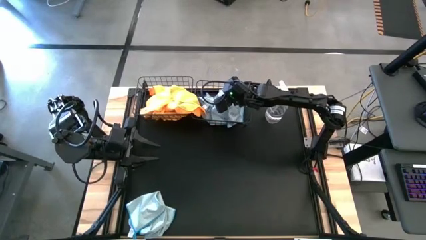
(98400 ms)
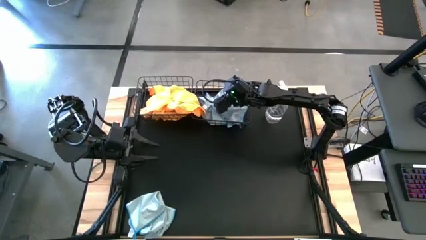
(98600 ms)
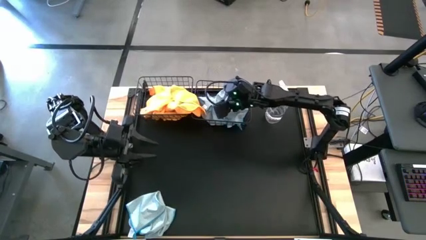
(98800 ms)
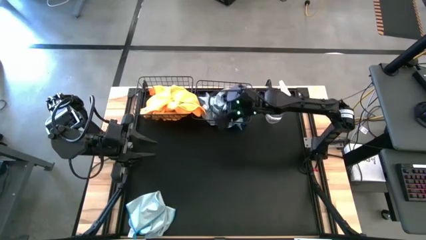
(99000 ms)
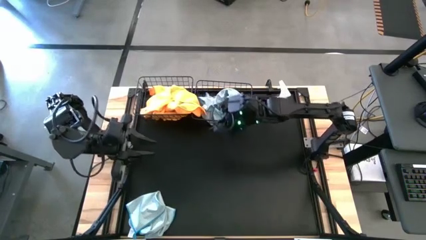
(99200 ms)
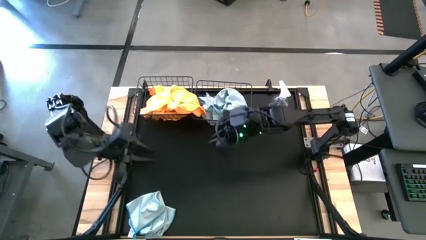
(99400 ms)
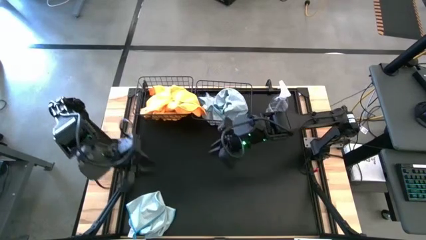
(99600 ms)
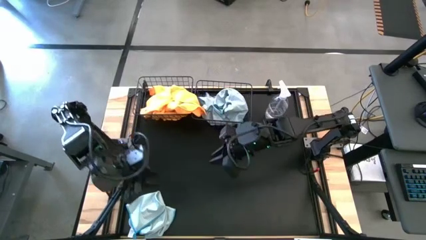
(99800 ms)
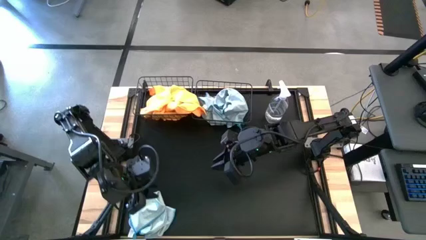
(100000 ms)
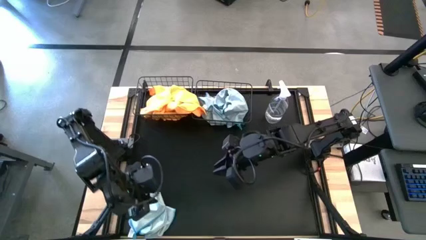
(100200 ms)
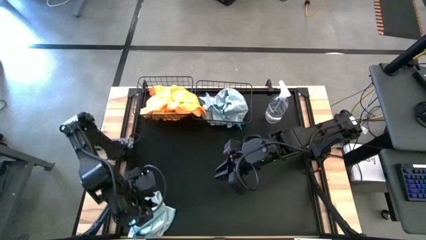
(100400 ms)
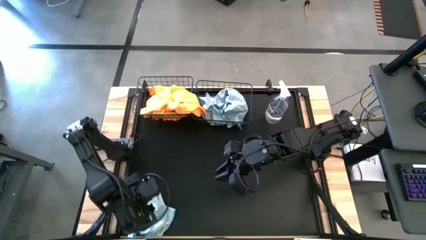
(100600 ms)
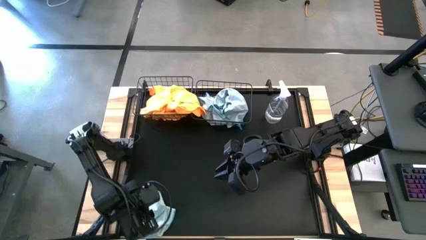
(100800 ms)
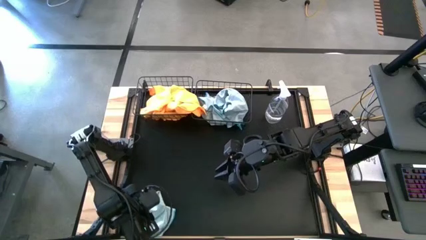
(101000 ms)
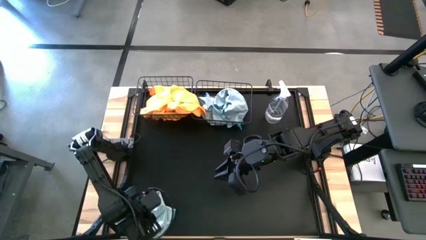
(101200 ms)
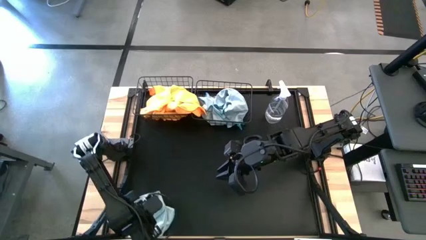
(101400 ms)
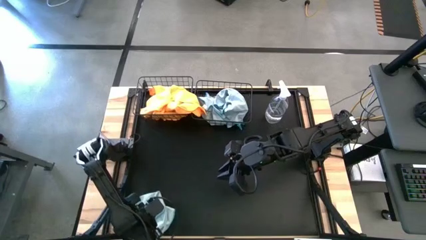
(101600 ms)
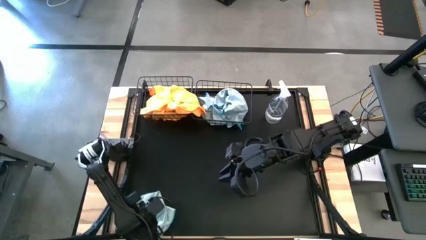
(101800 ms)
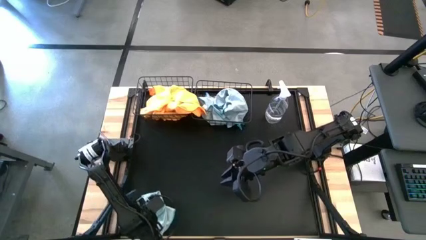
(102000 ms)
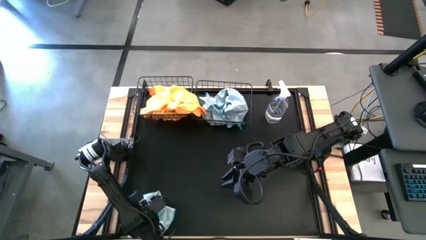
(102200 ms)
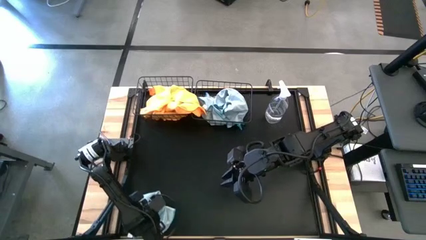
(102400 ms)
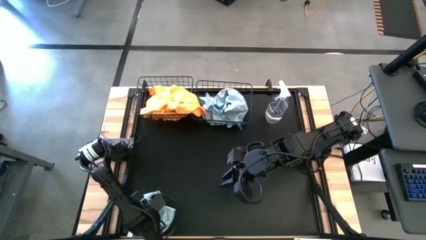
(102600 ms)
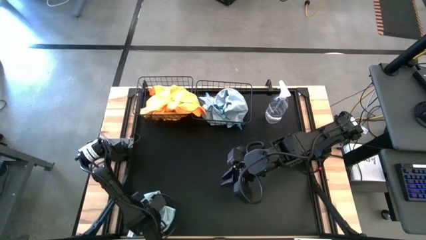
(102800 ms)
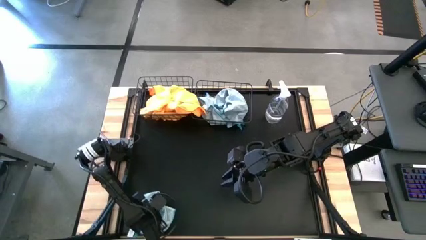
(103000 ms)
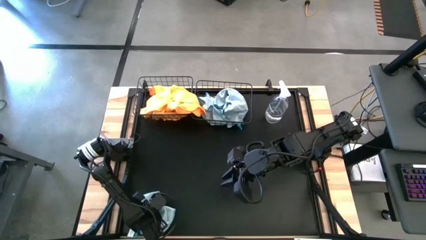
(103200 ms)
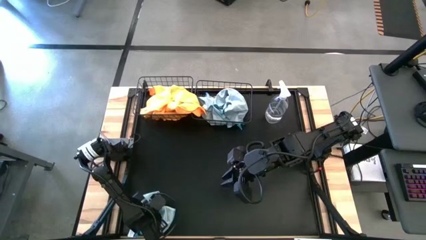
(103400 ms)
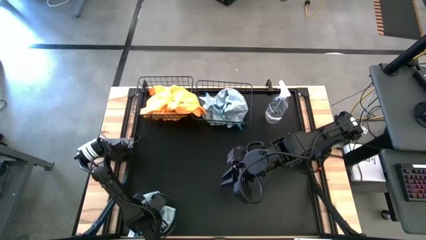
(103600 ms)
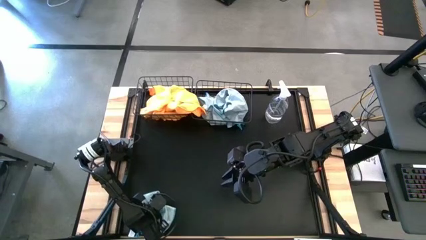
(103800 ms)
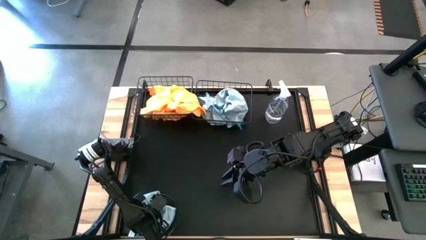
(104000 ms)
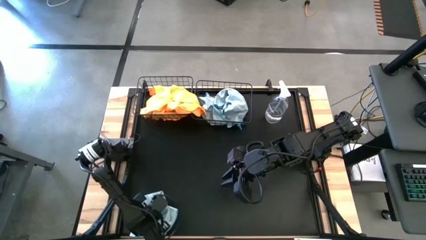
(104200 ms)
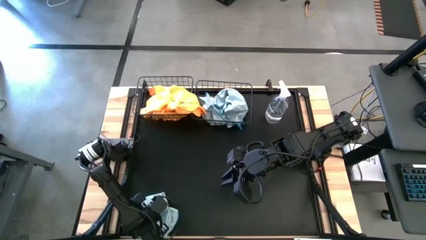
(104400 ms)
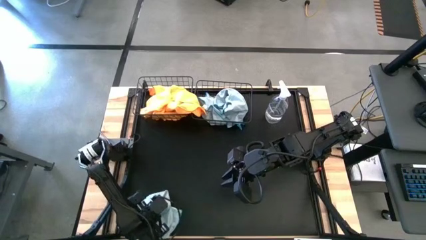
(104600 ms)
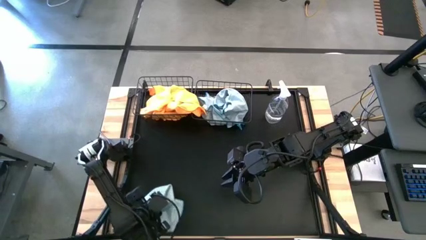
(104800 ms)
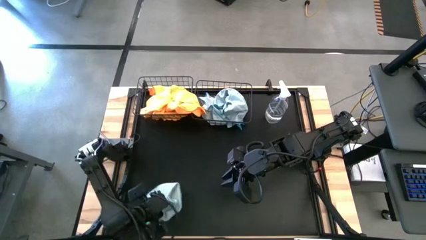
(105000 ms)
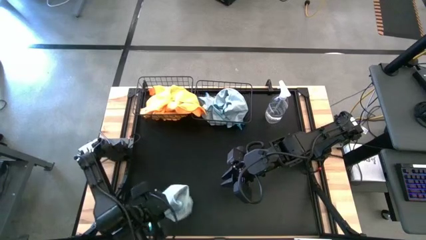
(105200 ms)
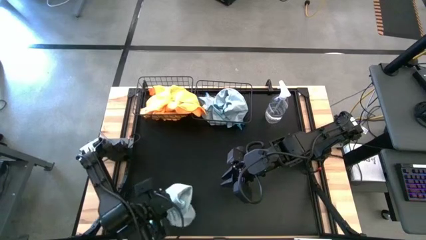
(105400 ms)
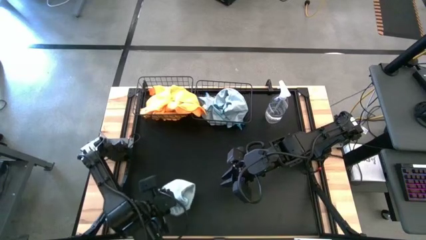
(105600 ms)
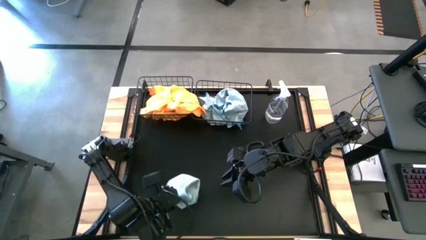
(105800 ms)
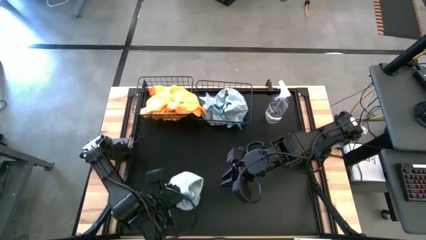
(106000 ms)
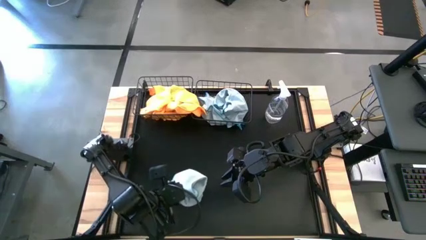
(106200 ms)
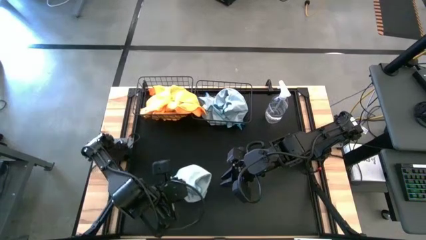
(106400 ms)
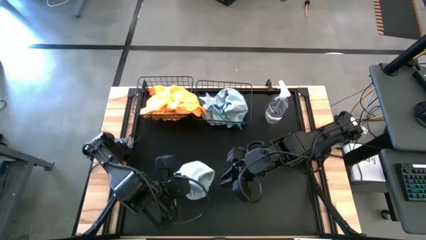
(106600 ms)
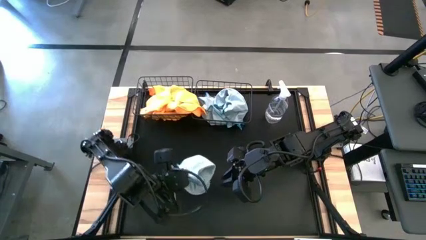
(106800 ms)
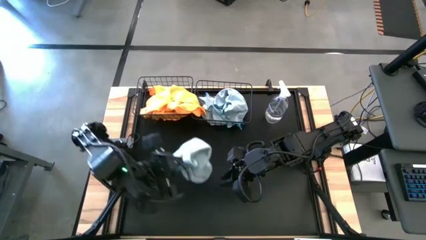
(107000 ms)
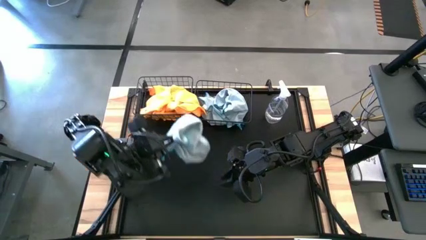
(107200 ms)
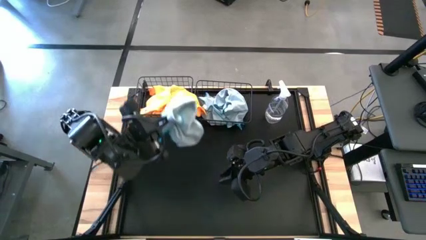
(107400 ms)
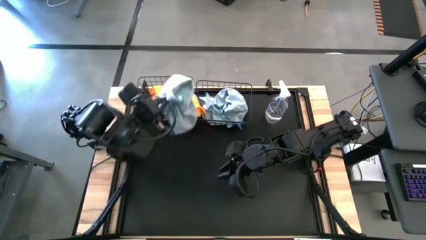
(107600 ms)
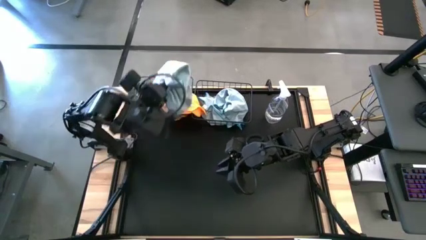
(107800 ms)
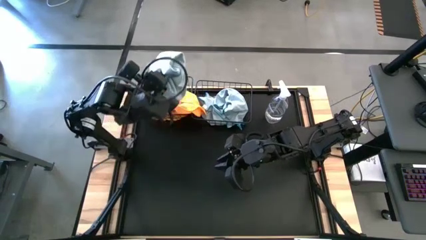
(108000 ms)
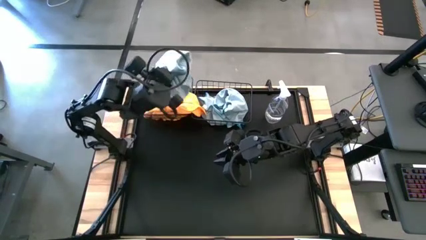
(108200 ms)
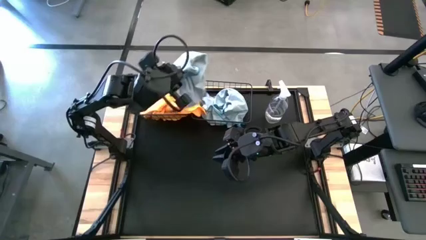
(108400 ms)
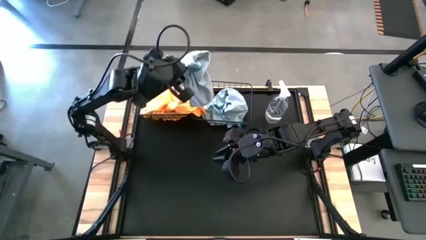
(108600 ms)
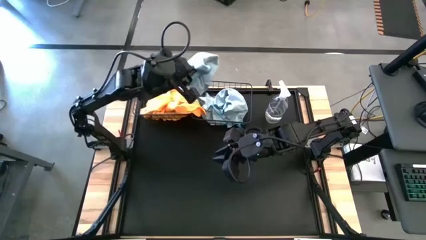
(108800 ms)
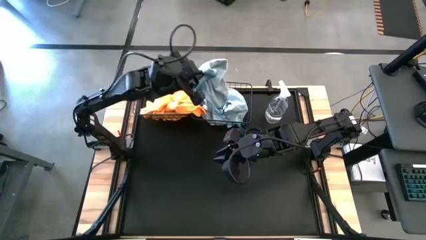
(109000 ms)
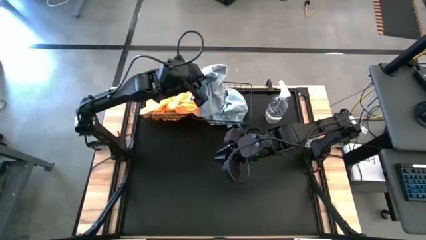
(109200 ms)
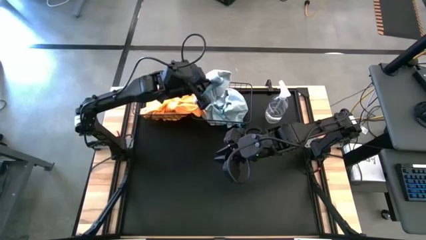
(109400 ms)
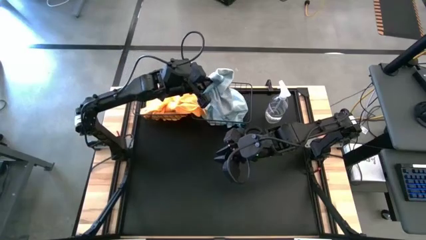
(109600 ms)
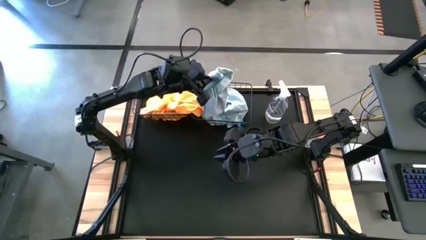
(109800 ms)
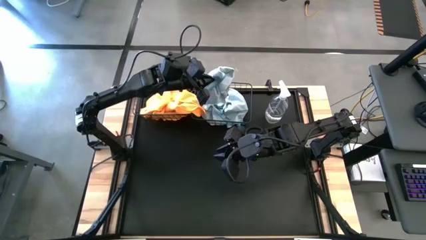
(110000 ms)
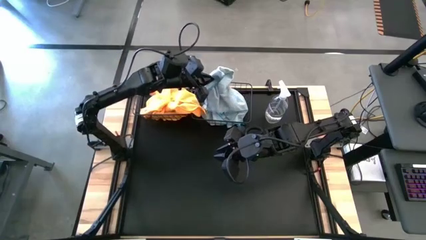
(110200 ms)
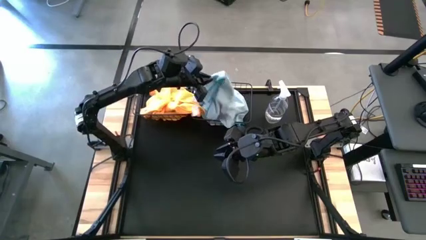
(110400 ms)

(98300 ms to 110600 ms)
Task: Sort microfiber towel by color & place in baskets
Put the blue microfiber cloth into the right black wire basket

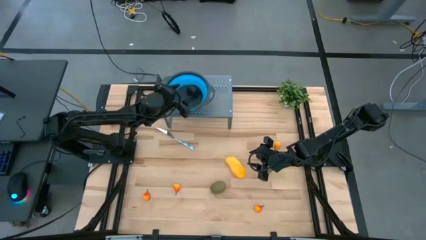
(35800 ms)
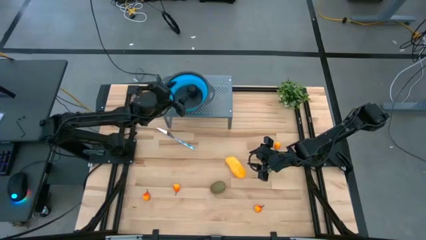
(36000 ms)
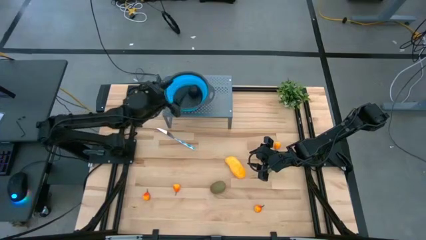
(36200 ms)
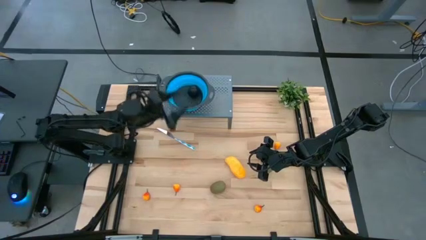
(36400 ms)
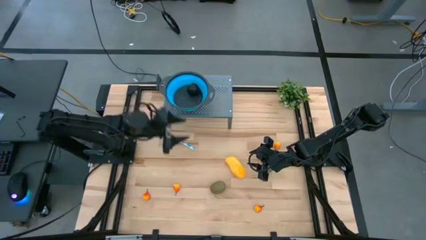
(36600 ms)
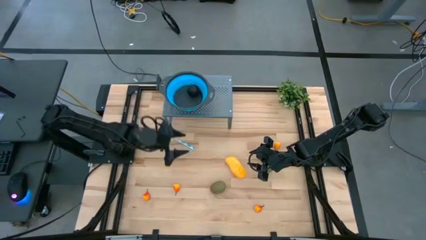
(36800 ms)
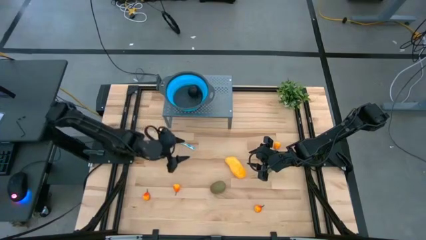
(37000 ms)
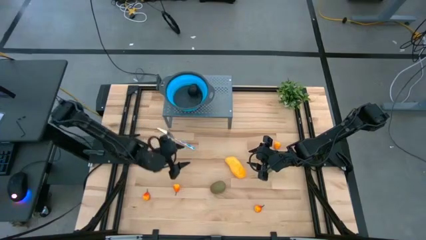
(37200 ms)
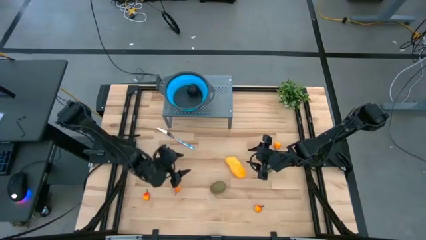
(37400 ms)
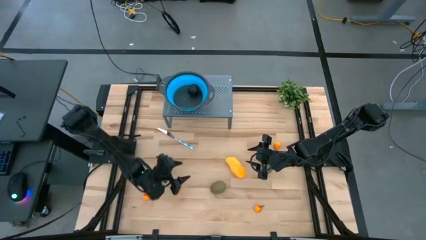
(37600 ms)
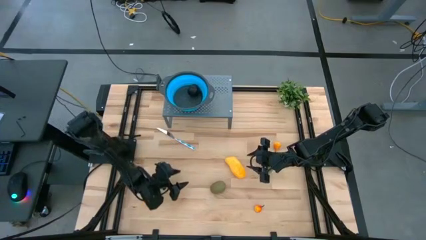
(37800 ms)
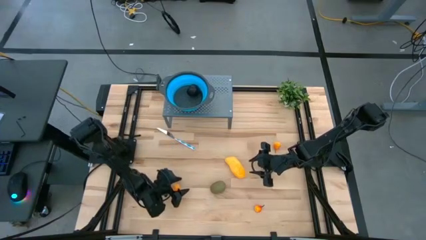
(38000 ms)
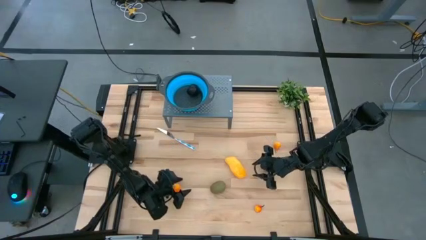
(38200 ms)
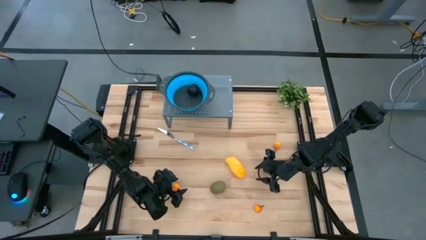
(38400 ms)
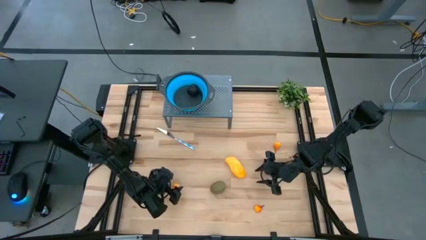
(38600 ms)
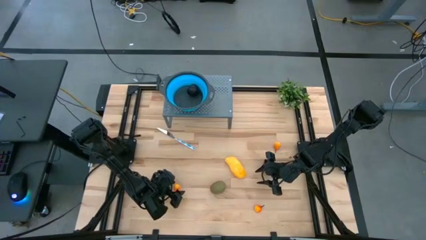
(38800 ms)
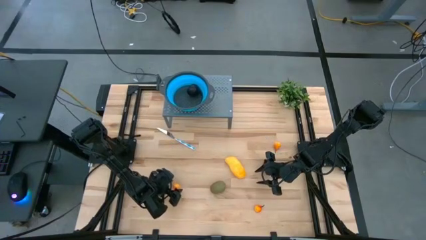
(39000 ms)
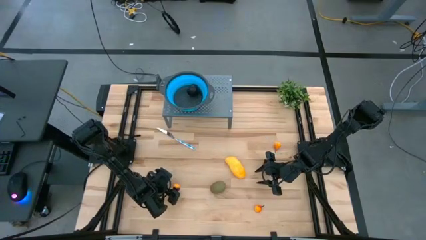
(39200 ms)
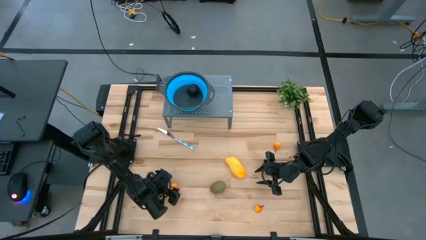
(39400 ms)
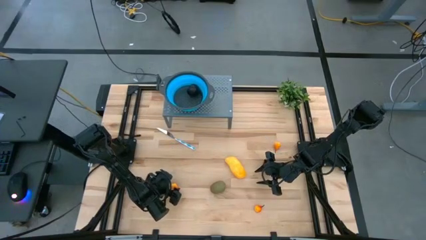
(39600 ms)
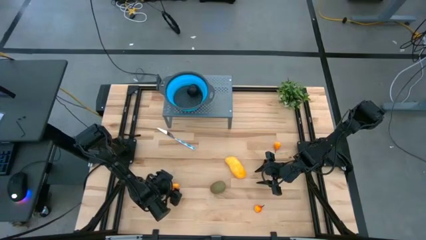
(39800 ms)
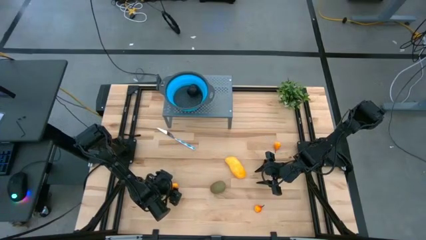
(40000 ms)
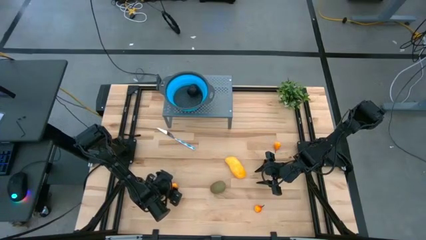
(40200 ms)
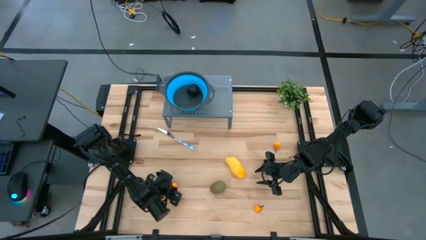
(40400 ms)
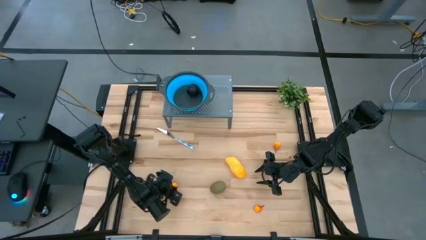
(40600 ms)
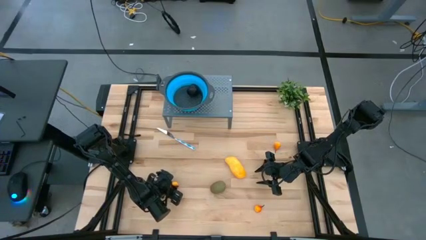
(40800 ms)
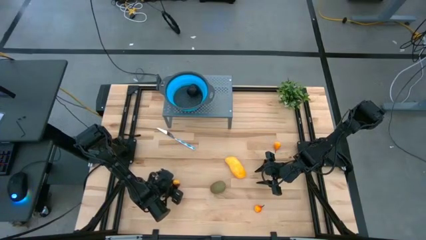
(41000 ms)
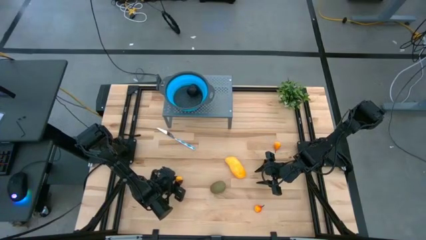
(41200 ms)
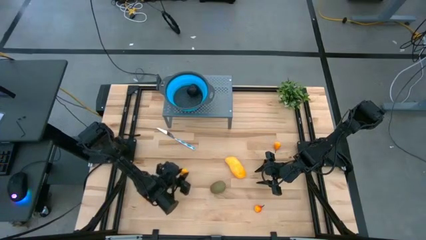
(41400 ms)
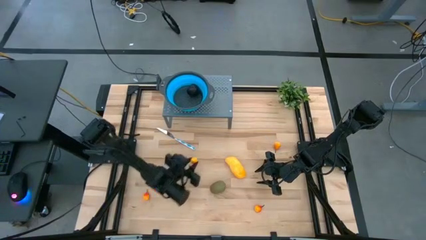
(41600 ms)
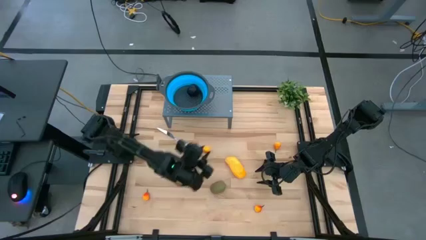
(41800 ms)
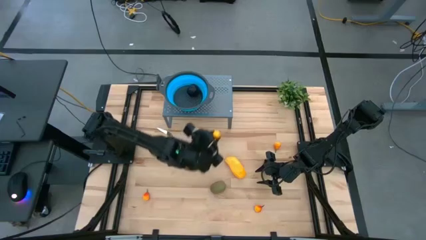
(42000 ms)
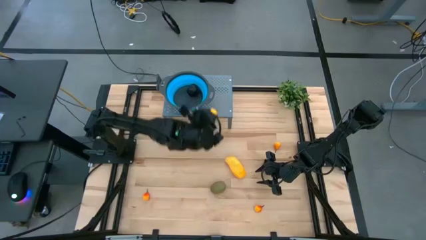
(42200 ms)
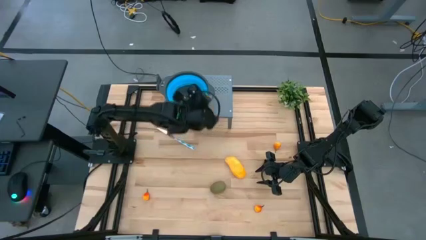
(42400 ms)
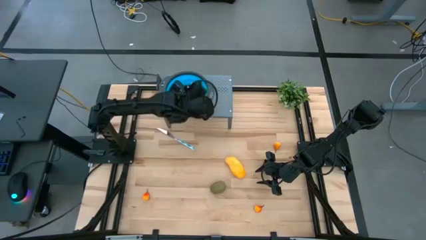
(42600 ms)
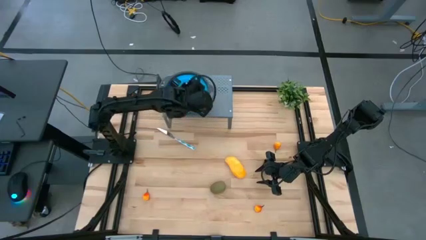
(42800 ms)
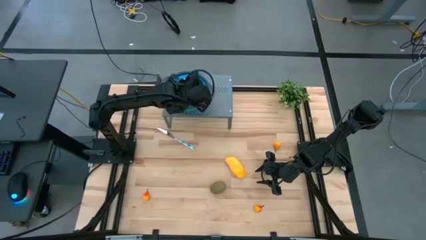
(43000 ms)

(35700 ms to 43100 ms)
Task: Pick & Place Fruit
Put the pear into the blue strainer bowl
